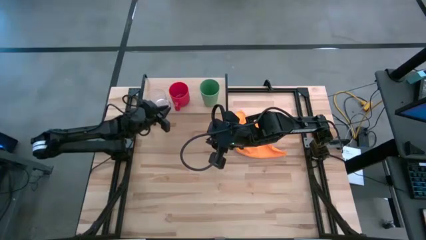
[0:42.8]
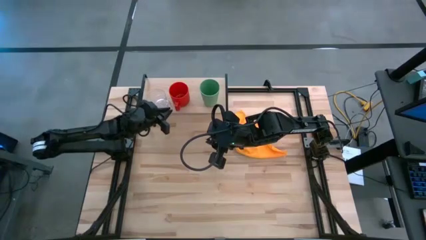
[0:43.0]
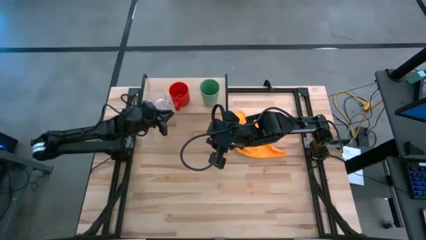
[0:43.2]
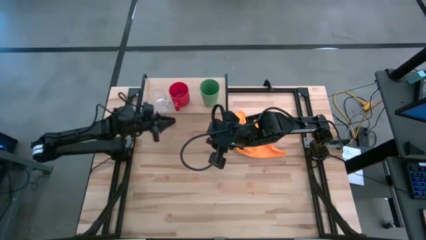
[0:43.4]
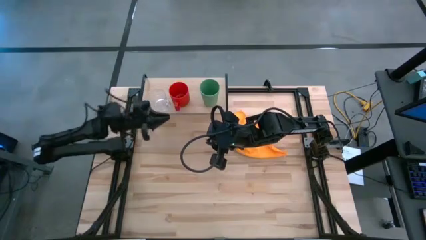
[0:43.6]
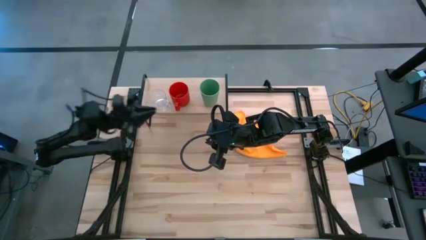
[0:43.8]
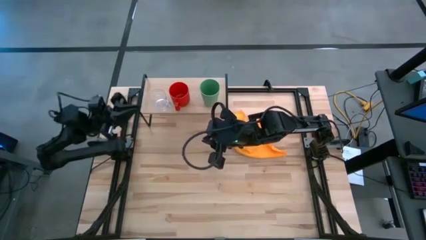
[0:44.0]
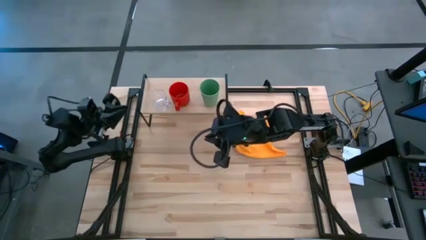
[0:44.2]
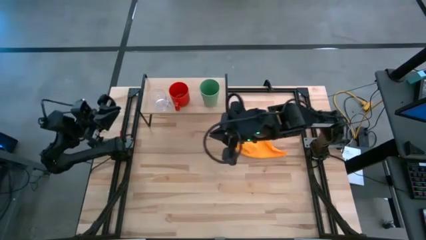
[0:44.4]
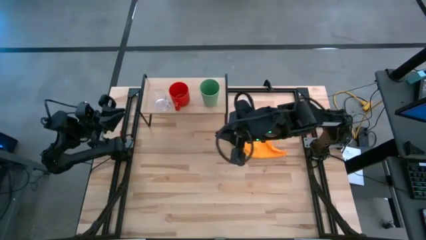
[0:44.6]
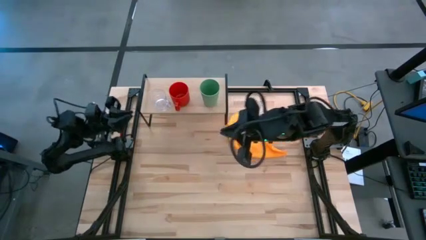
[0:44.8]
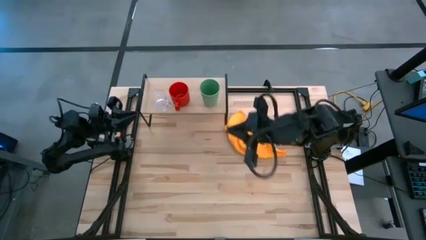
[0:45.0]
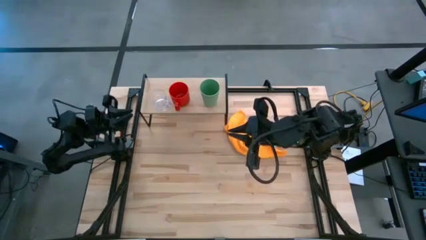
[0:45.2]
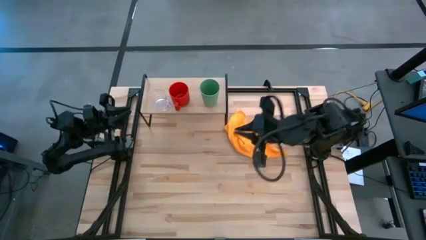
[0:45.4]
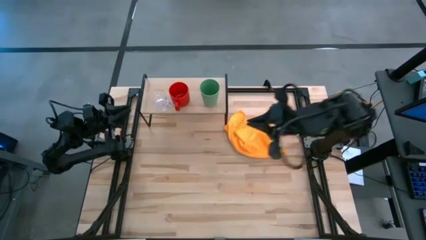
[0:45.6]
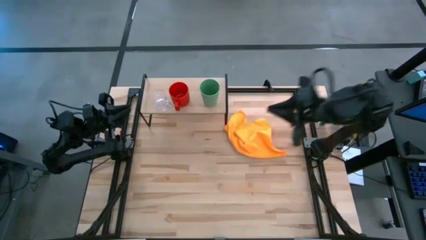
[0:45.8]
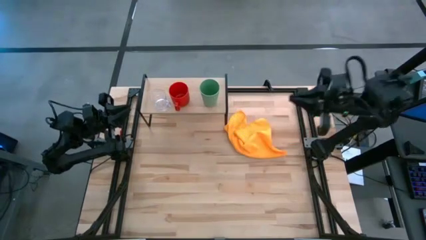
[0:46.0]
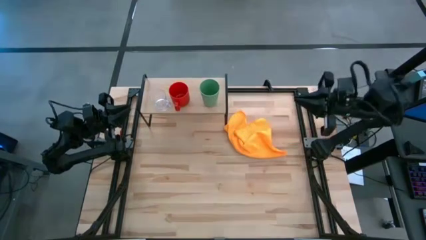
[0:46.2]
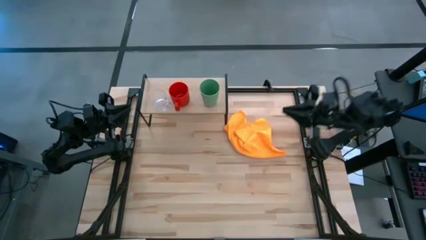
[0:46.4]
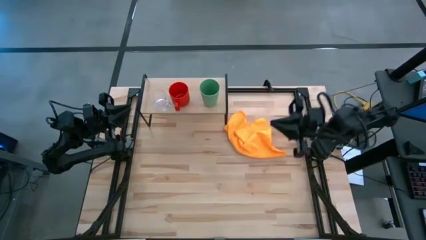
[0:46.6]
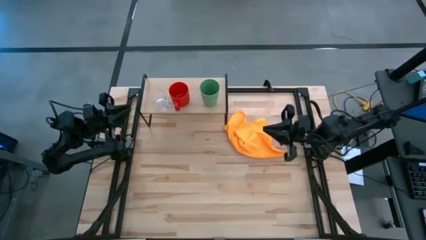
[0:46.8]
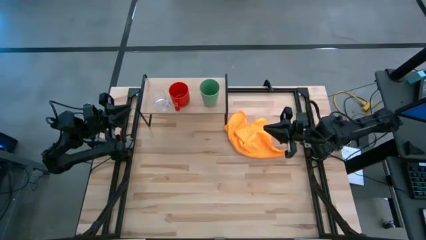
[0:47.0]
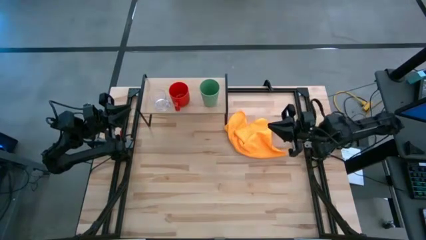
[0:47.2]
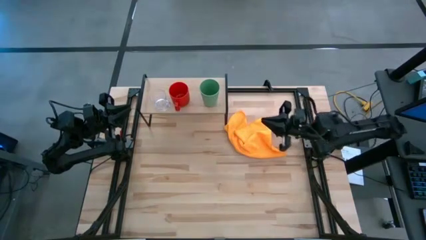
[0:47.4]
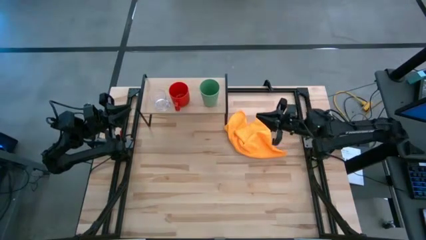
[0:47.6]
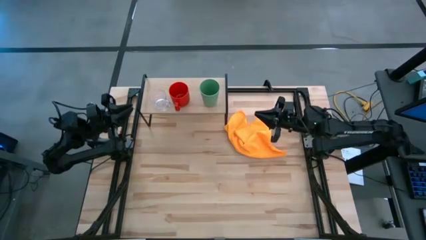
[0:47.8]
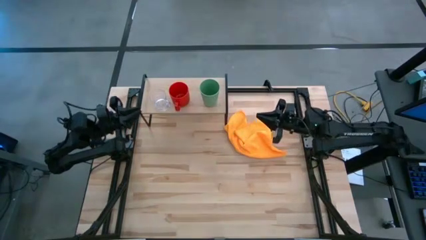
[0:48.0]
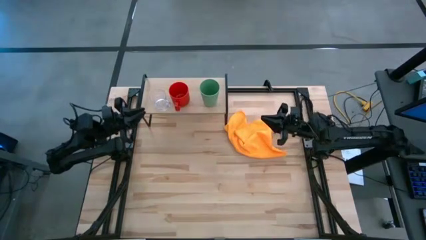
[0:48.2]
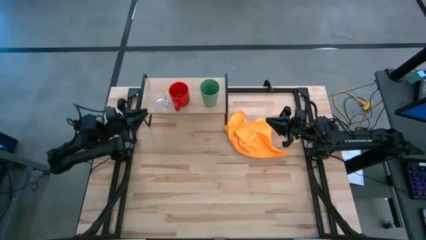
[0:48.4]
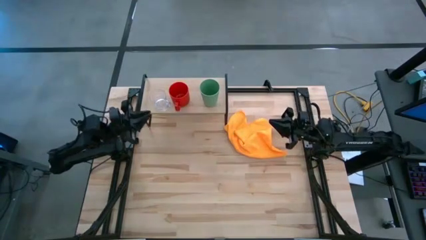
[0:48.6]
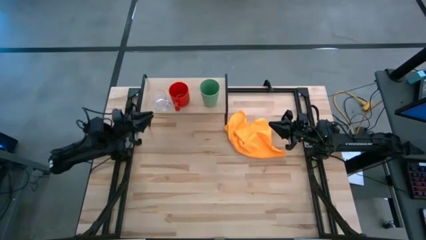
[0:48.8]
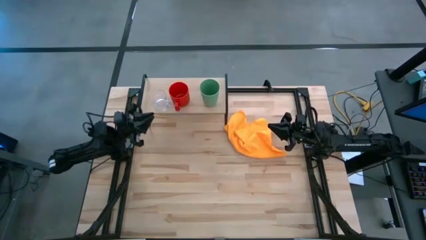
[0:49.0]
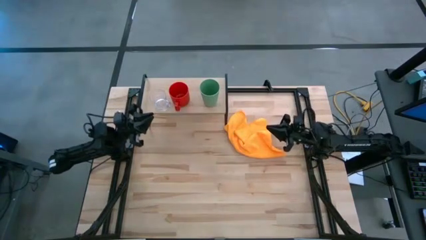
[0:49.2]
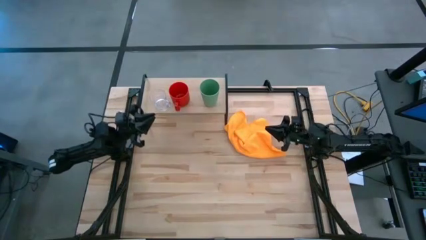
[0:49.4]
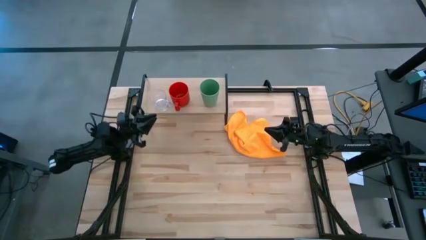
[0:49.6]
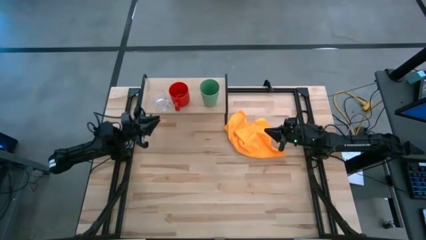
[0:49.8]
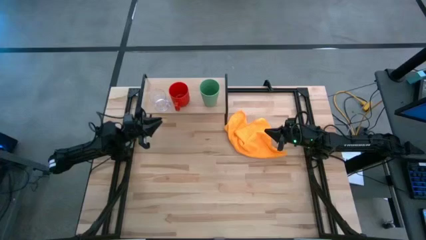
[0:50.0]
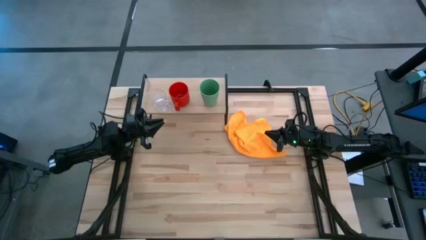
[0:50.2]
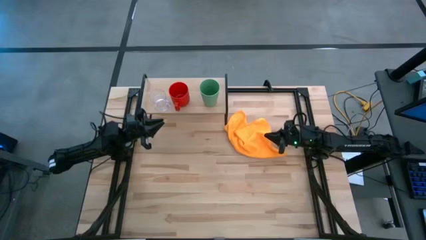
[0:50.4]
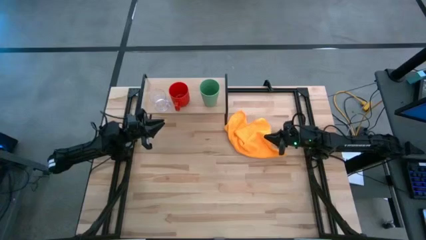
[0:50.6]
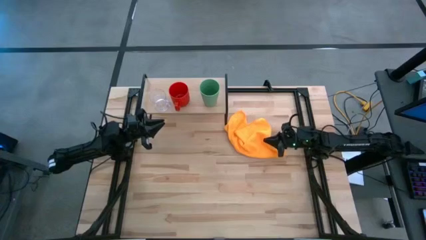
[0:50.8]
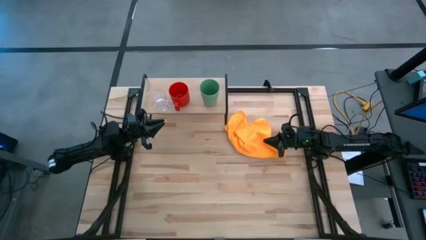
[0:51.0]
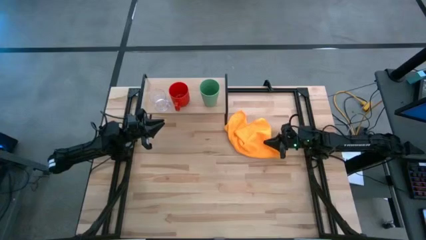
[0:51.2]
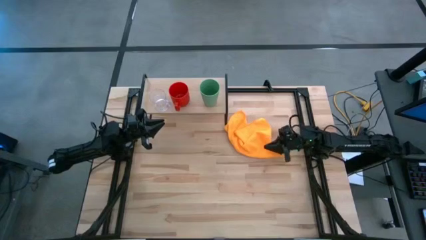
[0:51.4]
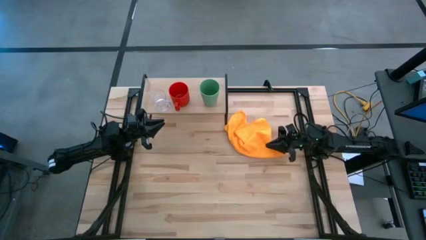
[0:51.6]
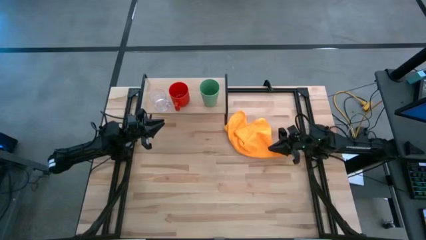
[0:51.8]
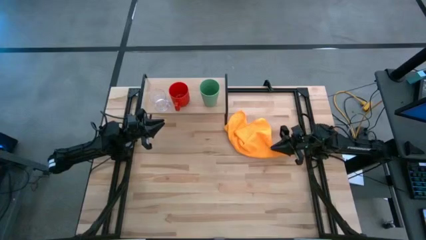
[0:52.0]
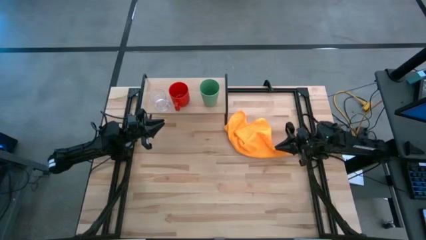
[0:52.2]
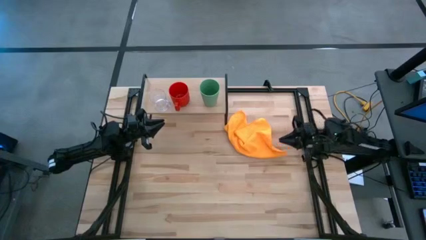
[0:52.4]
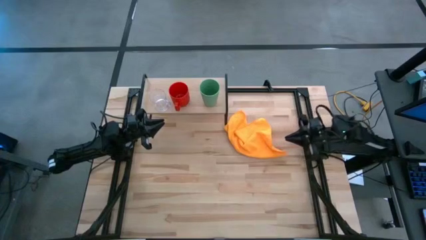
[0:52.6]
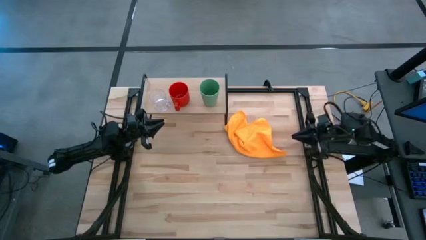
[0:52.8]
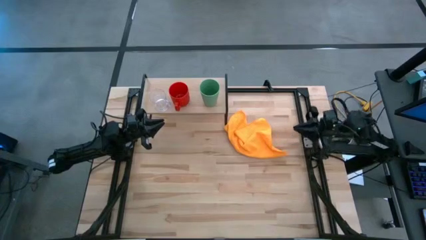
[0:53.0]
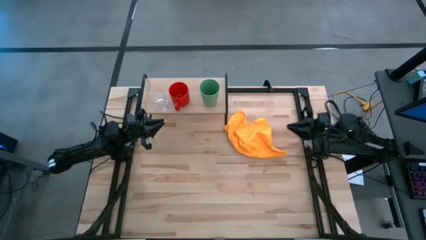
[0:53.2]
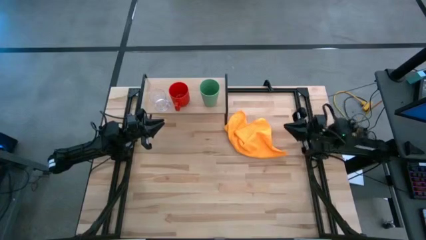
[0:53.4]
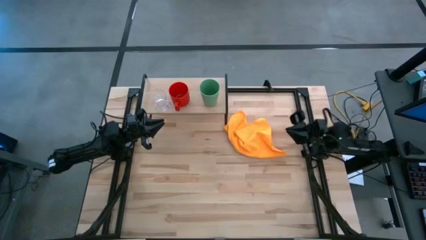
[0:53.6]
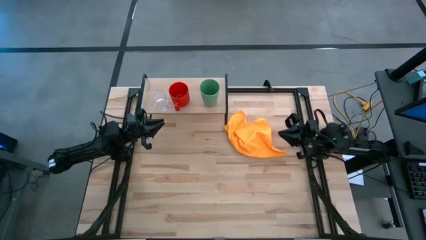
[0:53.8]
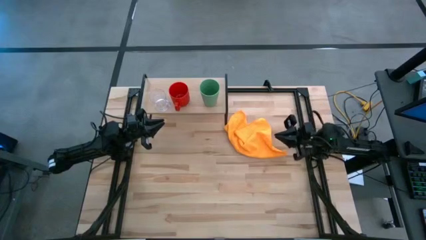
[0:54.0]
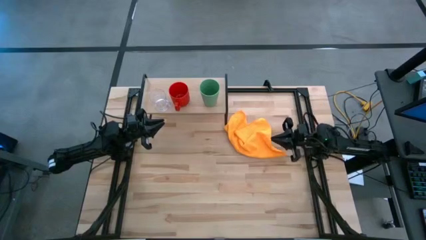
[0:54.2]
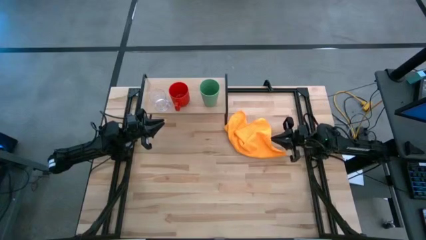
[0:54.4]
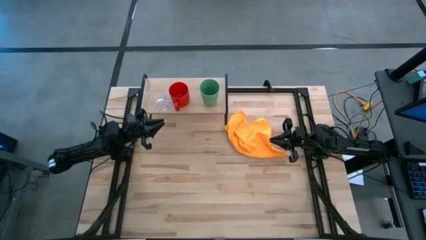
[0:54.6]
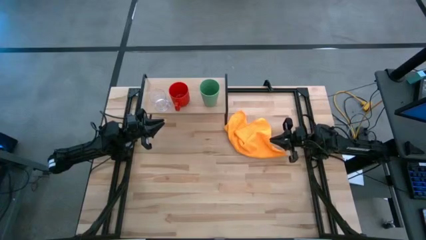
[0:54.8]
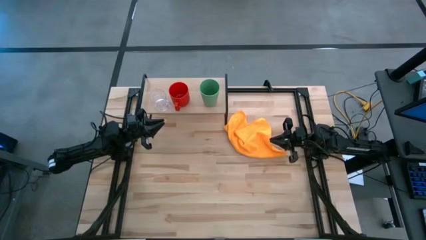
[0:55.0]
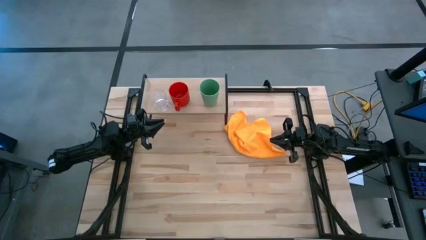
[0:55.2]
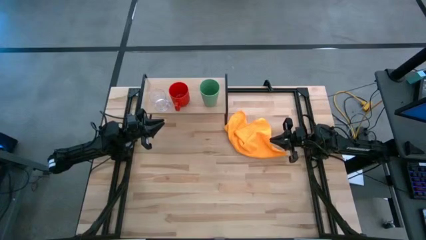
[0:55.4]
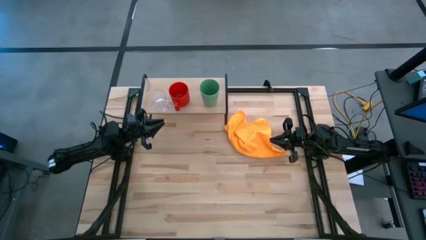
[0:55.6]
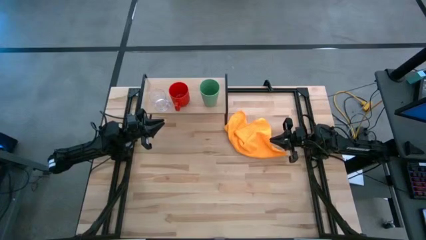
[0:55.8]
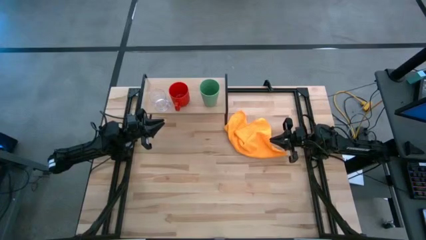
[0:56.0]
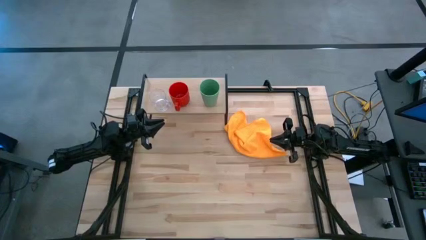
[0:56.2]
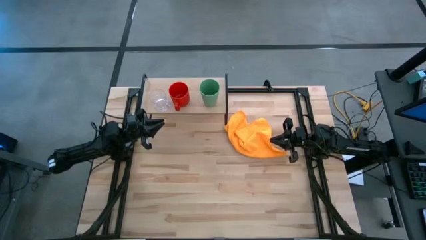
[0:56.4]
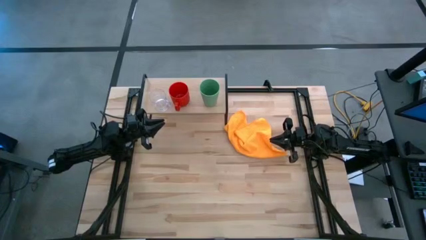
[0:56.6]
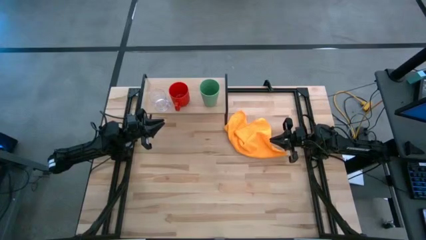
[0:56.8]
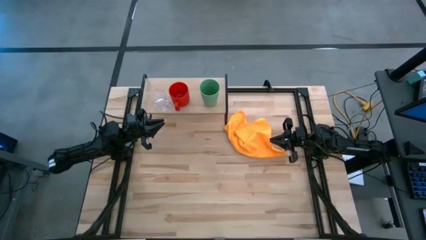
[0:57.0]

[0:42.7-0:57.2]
Task: Stack small to large cups/mugs on shelf
Return to Home Position

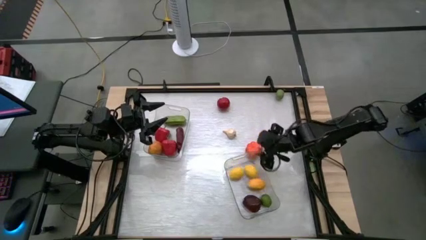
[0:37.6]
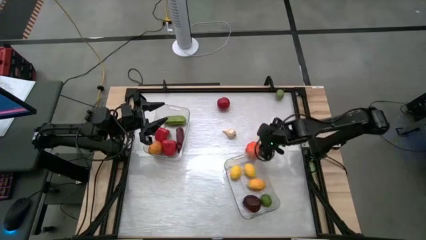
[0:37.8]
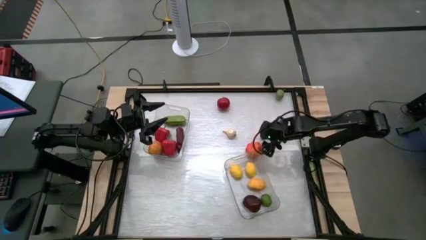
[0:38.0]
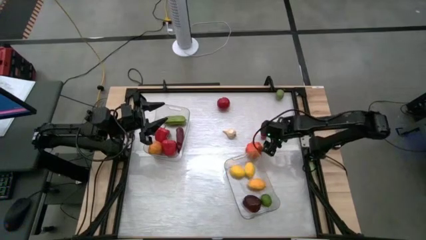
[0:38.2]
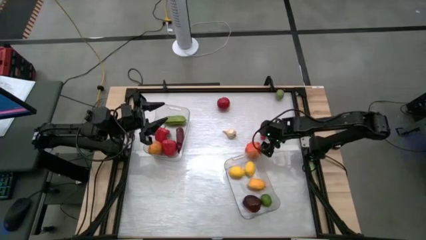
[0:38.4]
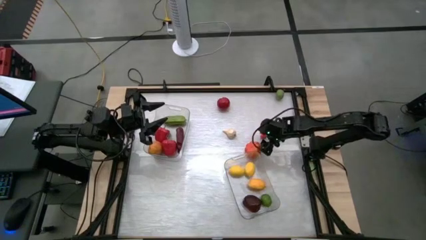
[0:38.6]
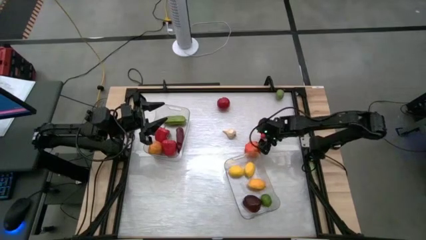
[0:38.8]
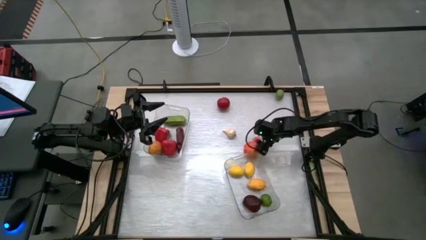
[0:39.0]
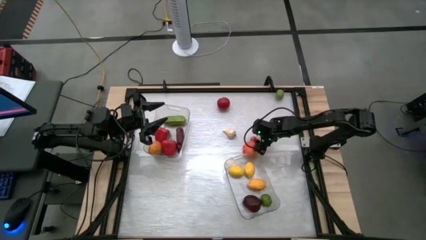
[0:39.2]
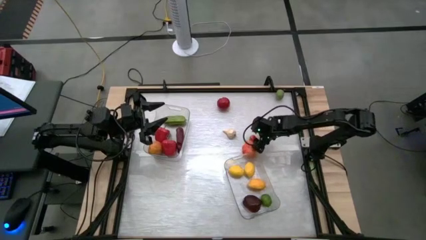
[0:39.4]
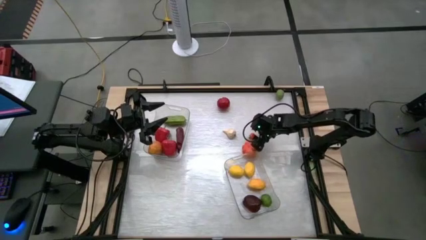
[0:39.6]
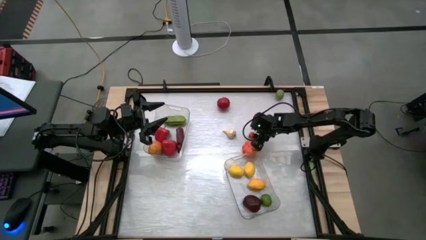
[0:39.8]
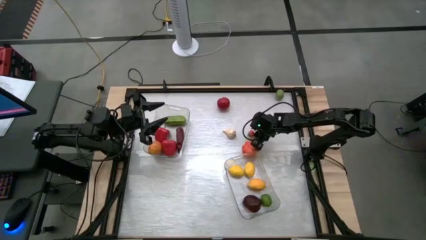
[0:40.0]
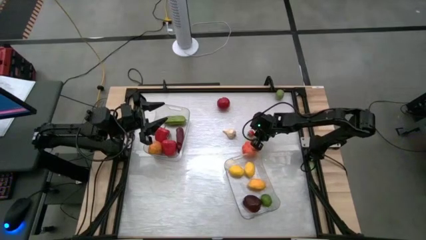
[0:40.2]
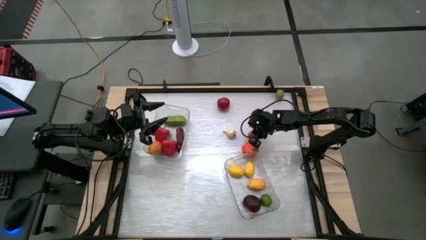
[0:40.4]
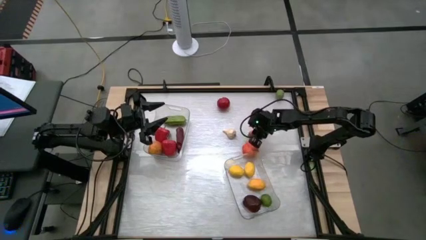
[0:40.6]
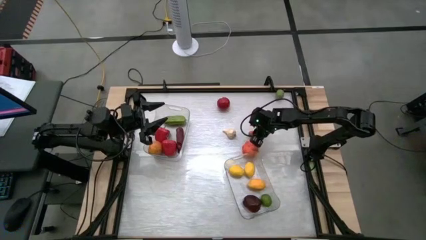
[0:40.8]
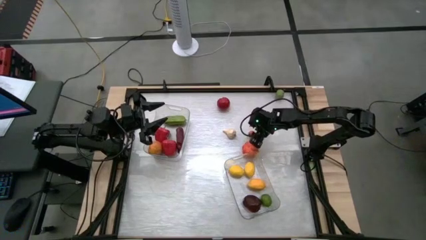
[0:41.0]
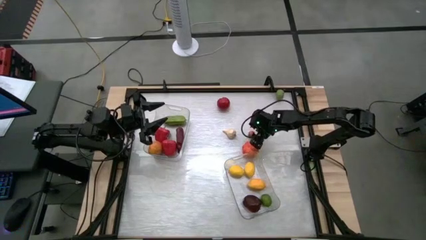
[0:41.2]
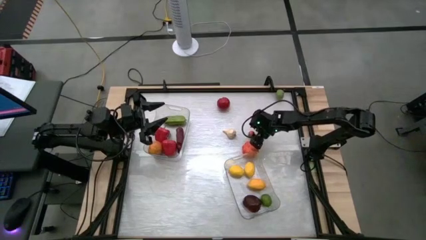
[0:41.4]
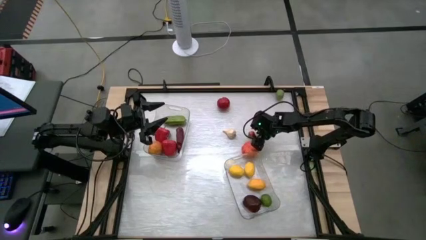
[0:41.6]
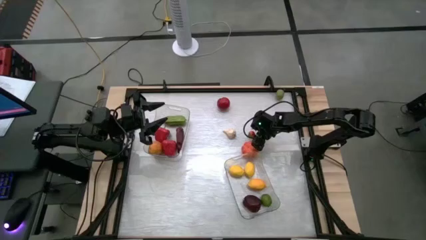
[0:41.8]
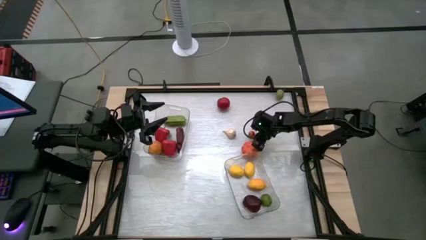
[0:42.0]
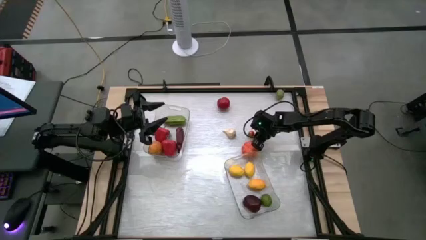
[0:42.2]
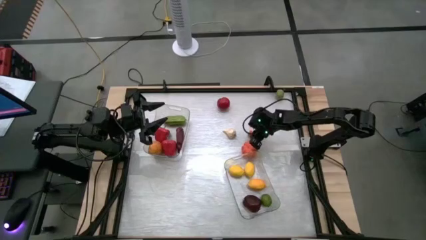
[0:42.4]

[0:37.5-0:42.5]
Task: Sort produce into baskets
Put the red tomato into the left transparent bin
